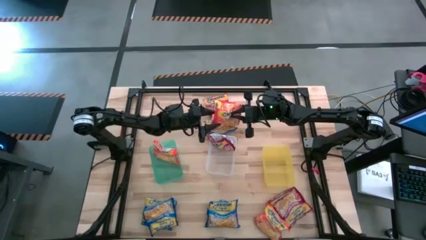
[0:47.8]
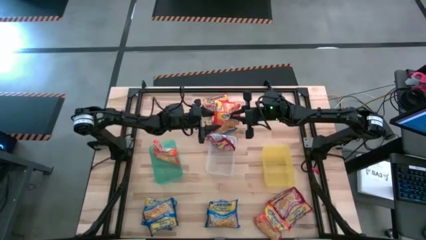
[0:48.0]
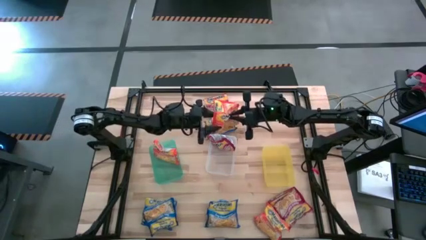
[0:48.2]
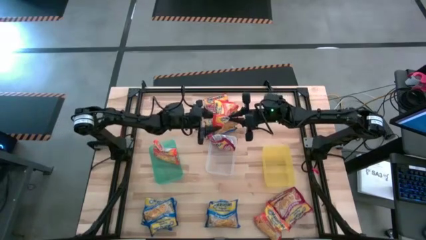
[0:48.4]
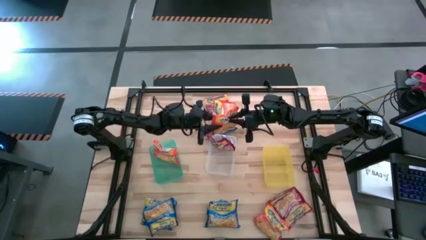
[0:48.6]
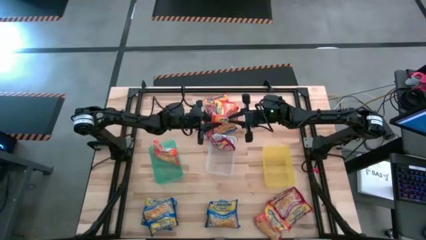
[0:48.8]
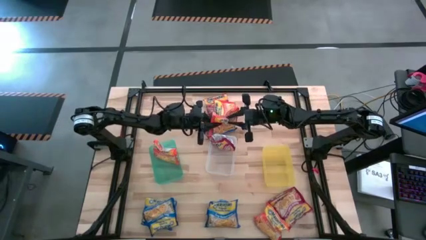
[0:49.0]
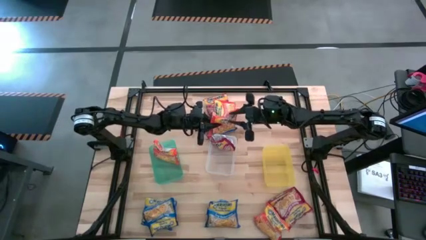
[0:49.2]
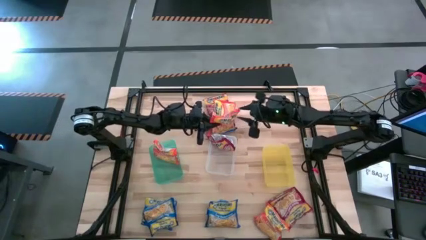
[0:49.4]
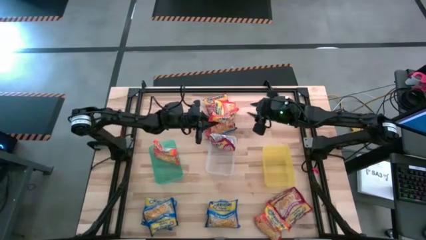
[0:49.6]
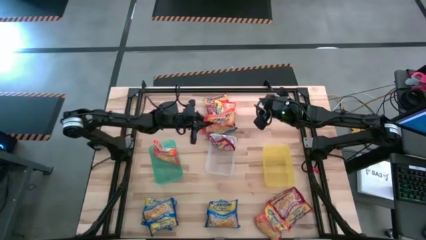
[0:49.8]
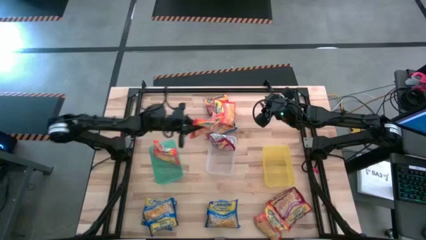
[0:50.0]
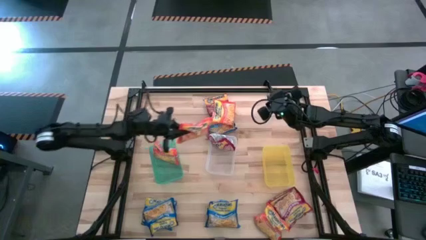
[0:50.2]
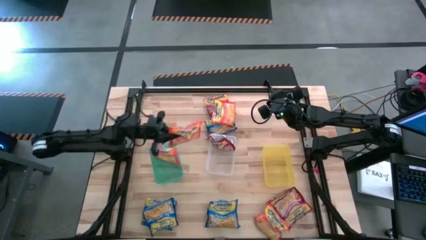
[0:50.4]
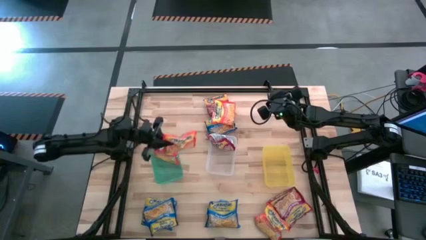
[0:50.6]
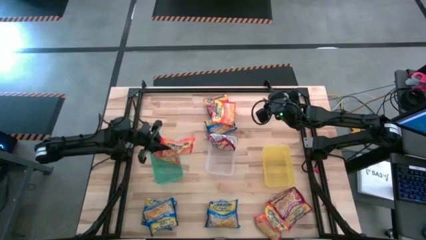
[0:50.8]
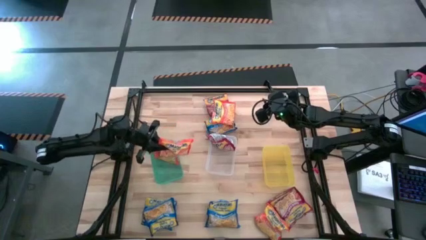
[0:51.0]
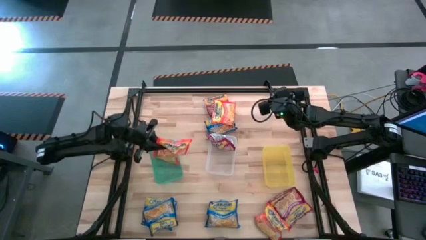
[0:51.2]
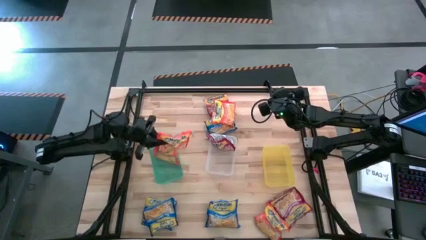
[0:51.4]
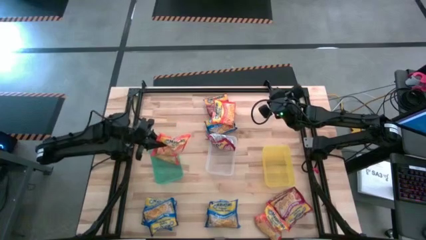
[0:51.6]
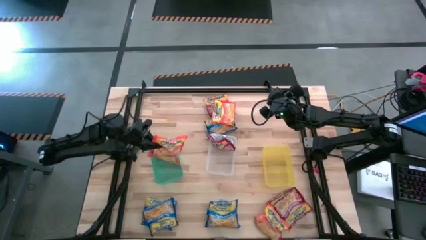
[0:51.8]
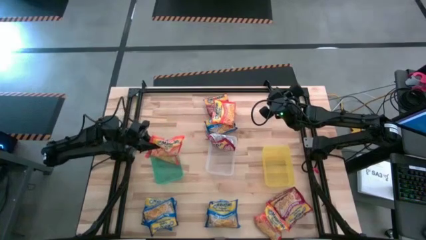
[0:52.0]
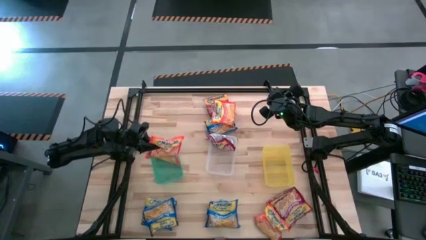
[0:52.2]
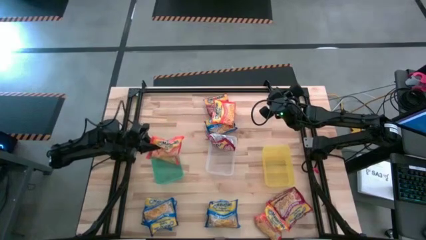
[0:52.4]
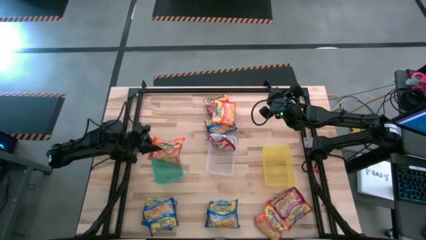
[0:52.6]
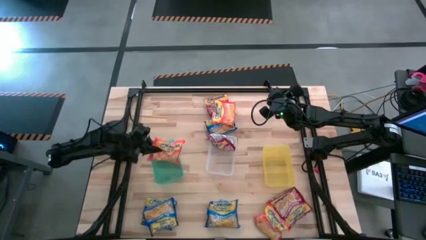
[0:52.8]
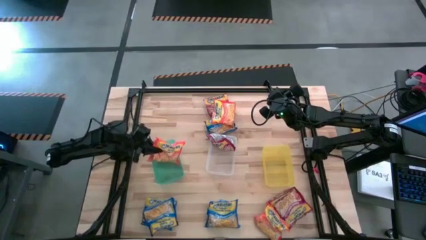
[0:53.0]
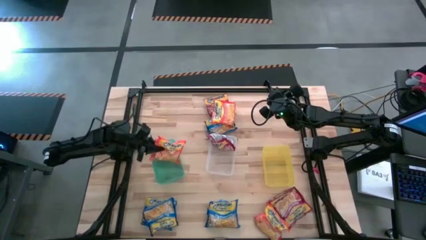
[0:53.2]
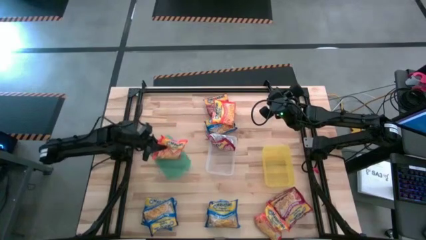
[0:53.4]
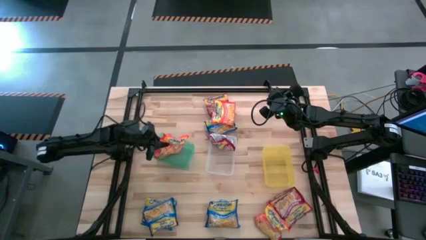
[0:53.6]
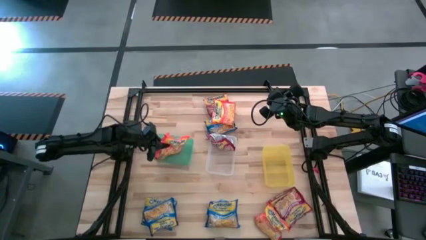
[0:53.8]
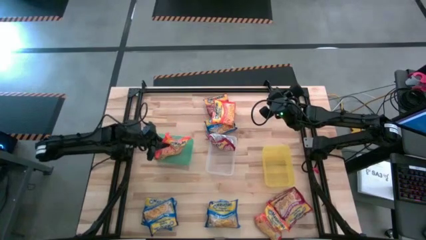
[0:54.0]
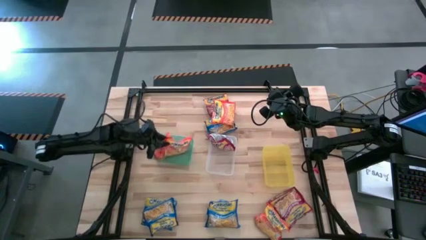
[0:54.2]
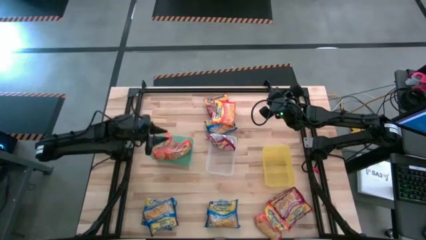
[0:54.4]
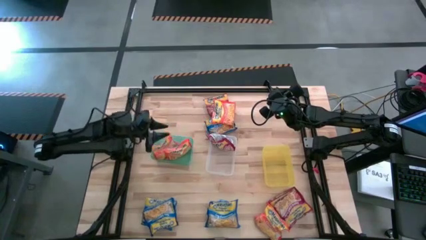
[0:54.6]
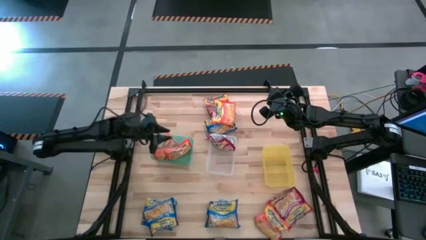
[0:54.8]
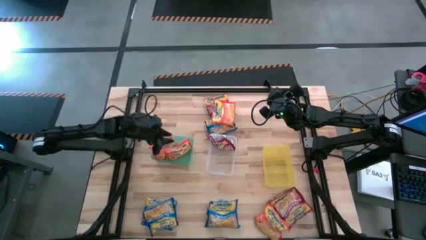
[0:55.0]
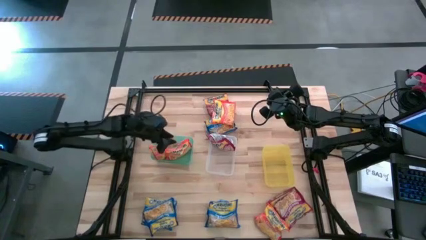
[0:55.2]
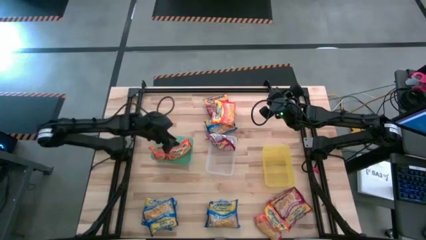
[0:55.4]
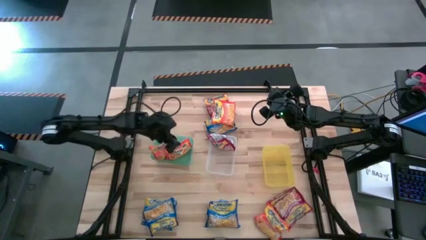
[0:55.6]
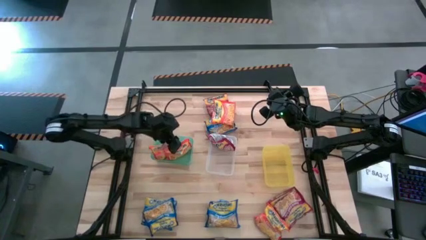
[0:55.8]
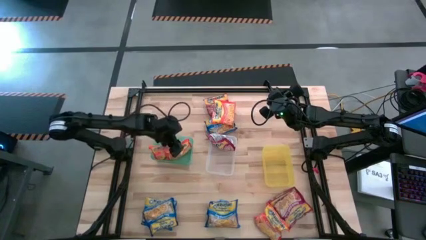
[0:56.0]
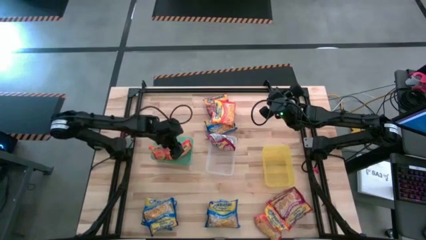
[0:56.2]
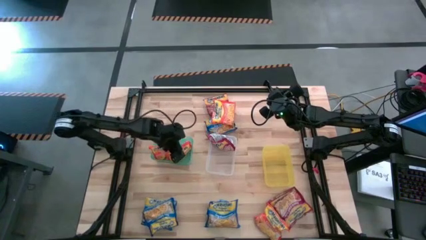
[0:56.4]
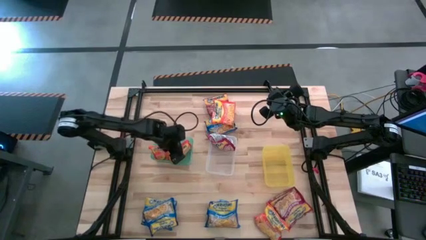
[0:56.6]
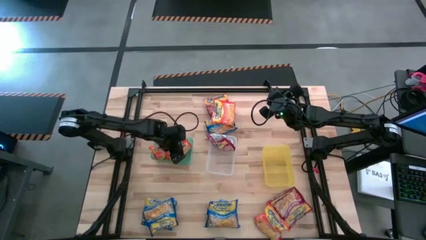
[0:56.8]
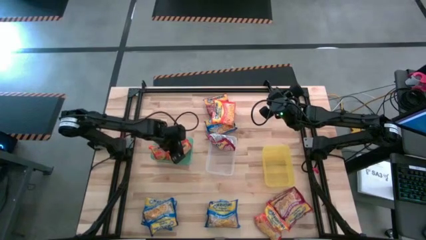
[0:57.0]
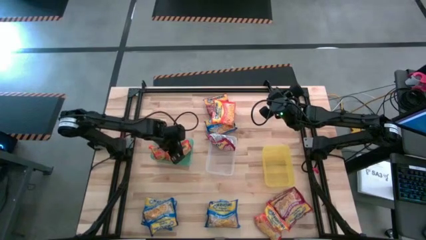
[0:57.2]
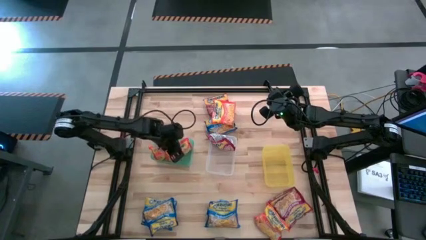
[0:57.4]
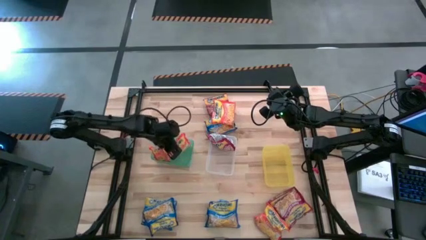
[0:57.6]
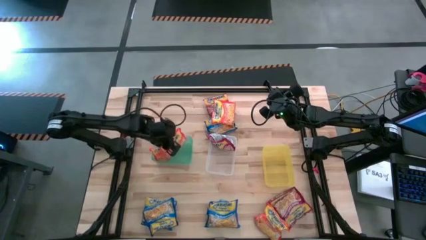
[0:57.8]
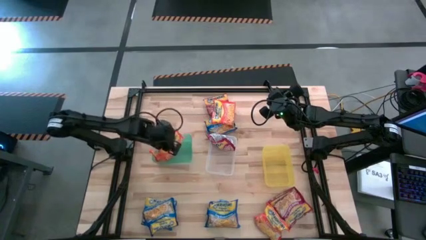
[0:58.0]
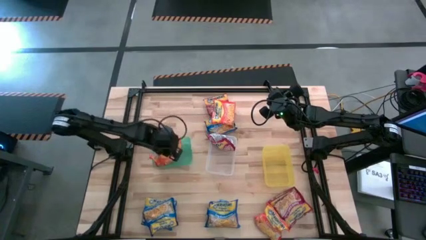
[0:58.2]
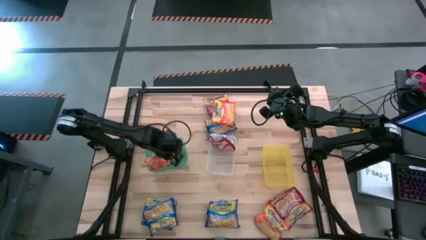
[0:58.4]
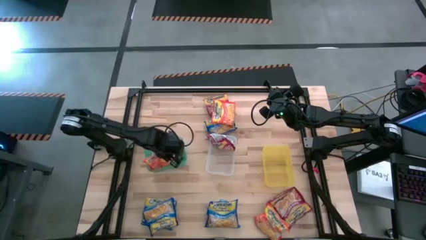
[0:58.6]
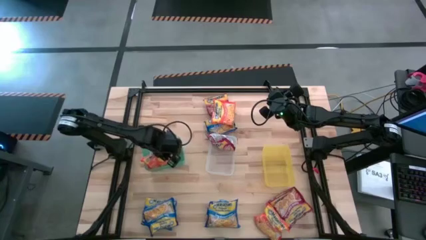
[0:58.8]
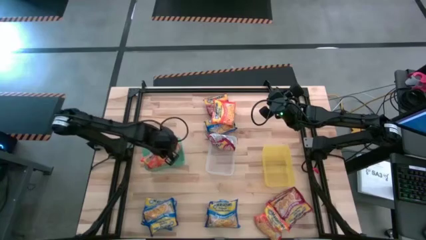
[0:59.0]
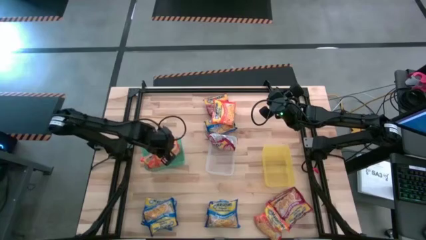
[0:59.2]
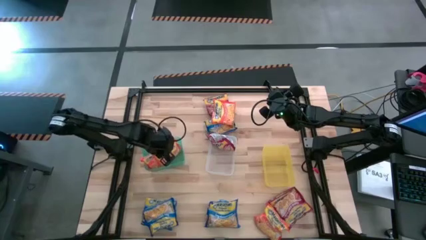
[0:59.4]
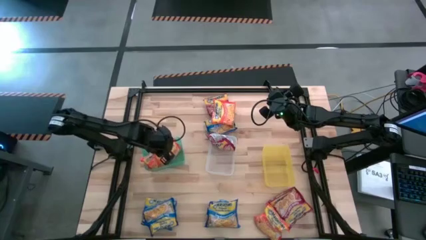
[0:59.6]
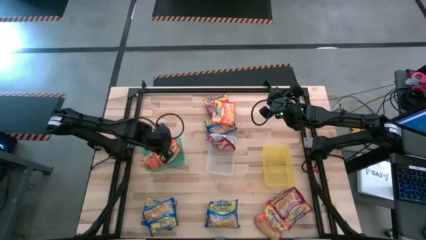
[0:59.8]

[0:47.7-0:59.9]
Task: Sort Maruchan noodles
Put the orange noodle pack into the green bin

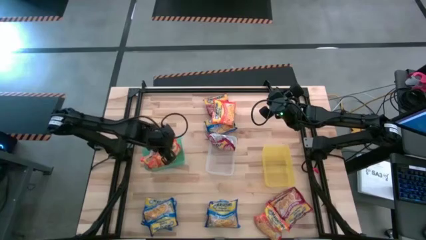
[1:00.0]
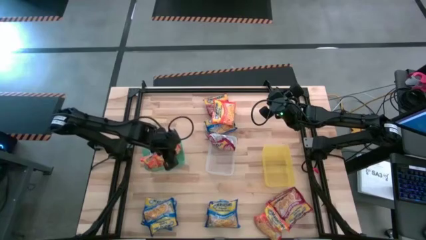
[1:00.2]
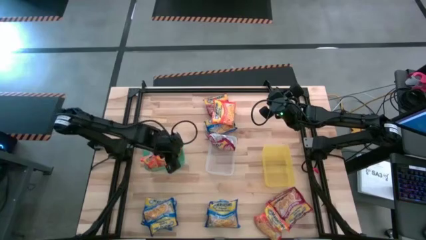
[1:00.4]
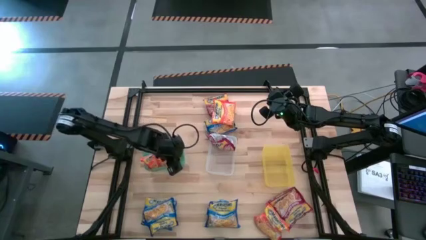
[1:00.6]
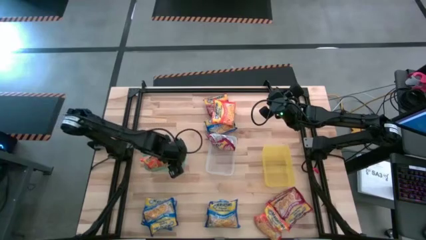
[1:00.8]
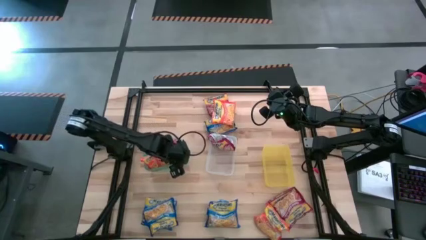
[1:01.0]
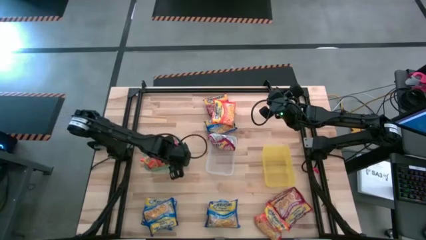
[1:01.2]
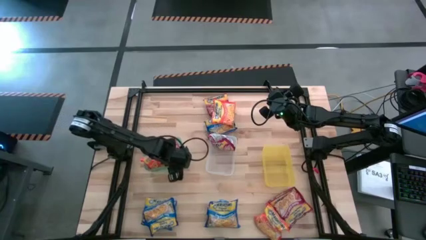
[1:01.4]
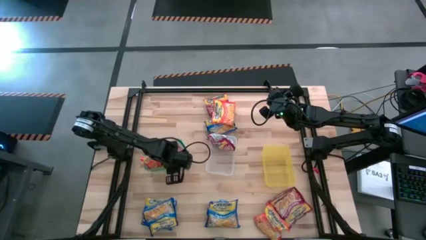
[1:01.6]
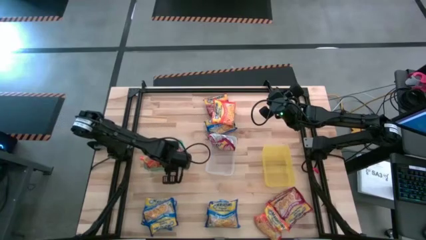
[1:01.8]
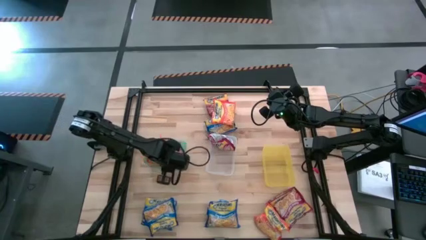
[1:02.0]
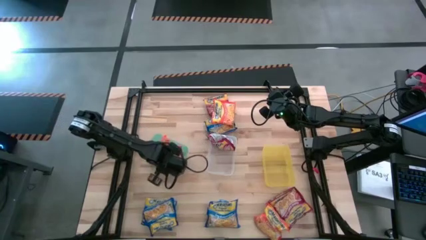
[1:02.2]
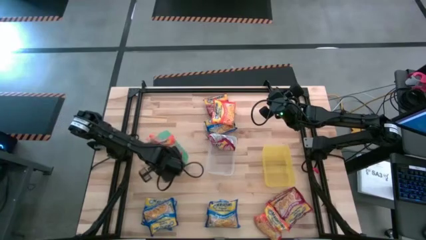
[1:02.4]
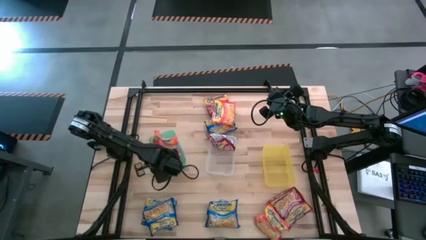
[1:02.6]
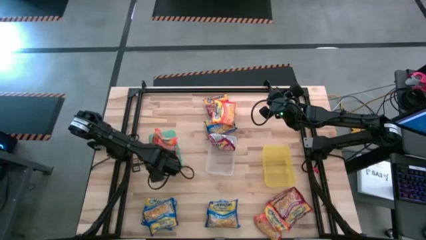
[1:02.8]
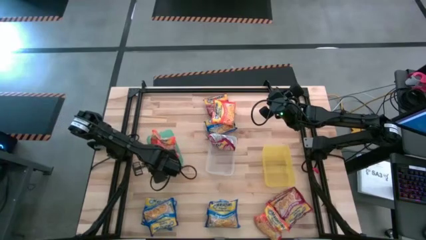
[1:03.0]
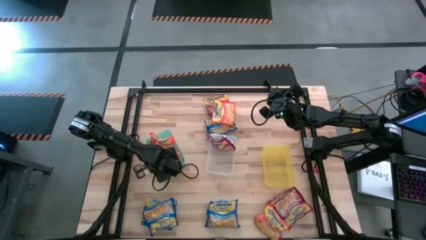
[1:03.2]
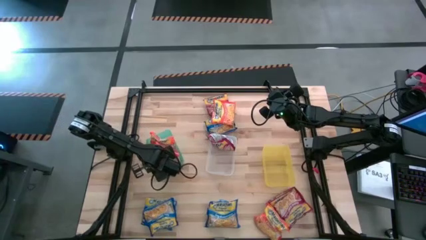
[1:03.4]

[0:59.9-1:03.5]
Adjust the green bin

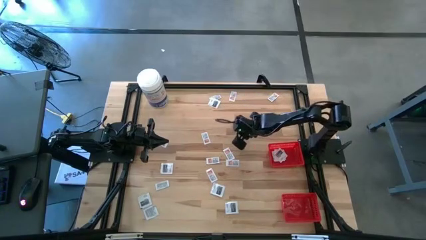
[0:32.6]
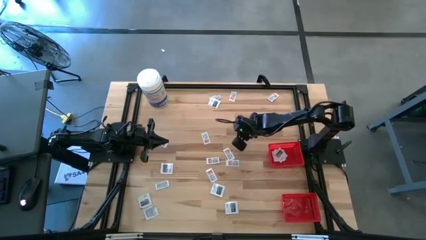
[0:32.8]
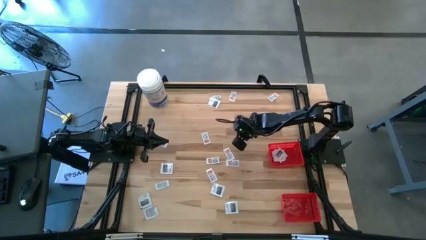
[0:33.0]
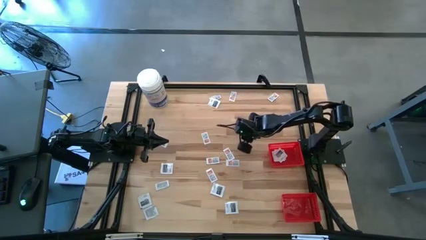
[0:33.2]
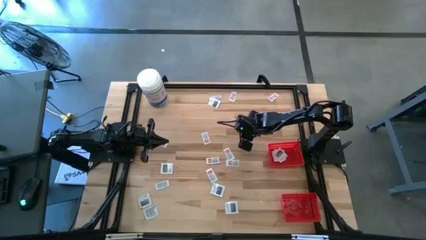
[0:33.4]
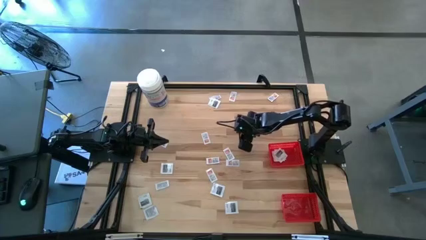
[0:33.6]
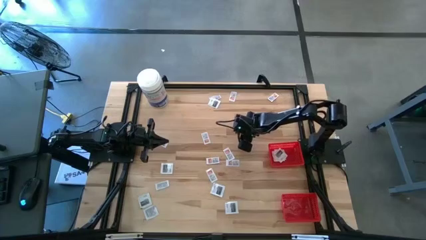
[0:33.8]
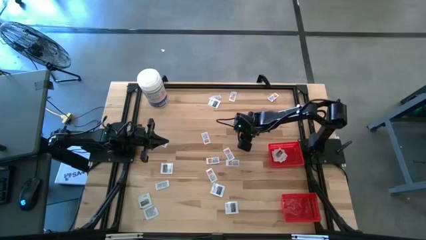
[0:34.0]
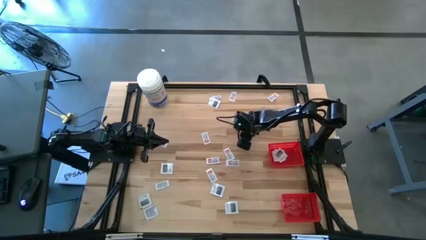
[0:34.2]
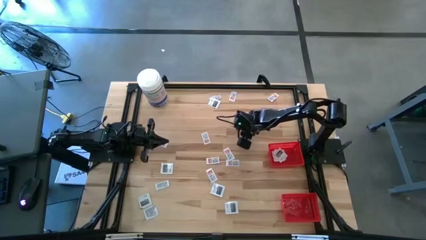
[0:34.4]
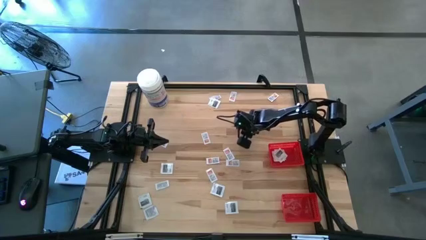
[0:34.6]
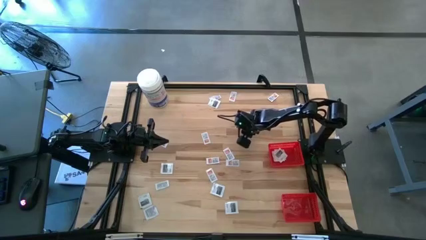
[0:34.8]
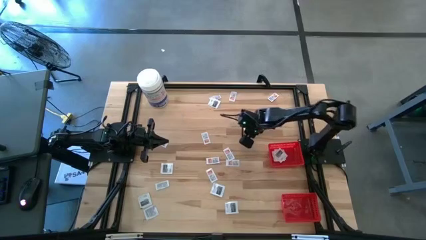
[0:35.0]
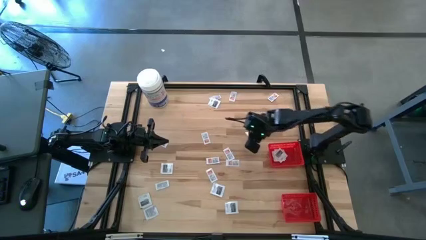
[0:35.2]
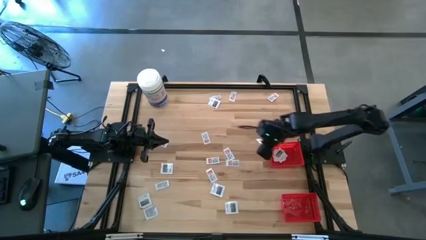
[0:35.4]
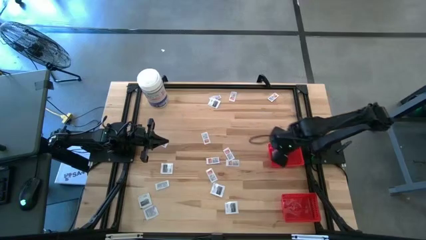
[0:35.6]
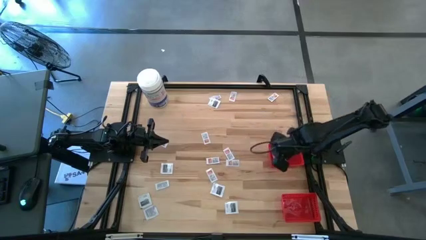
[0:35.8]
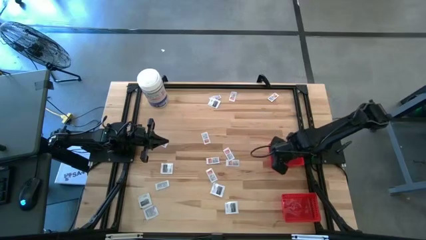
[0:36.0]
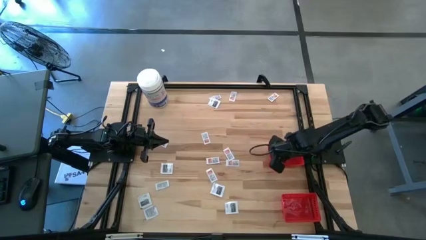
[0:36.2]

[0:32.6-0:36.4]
Task: Pick & Place First Aid Supplies
Put the black towelette pack into the top red basket
